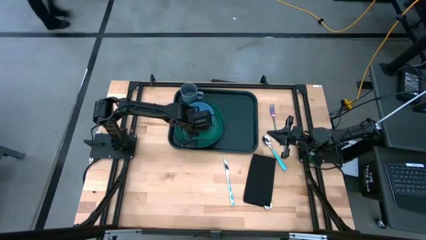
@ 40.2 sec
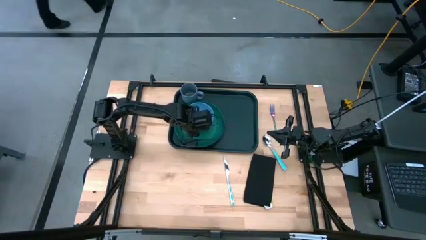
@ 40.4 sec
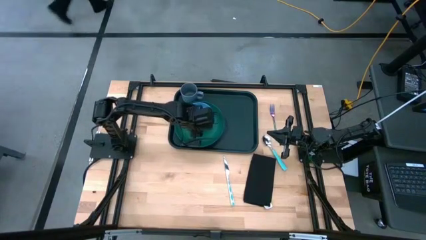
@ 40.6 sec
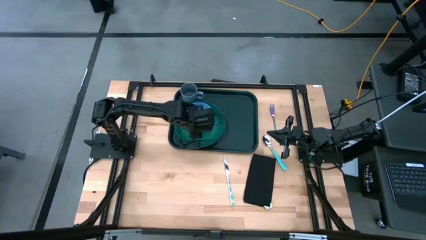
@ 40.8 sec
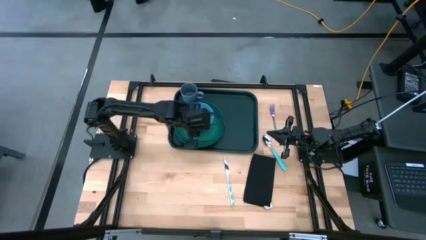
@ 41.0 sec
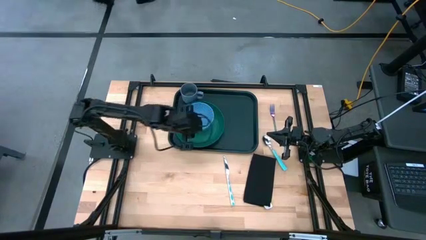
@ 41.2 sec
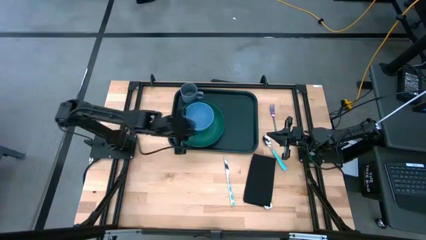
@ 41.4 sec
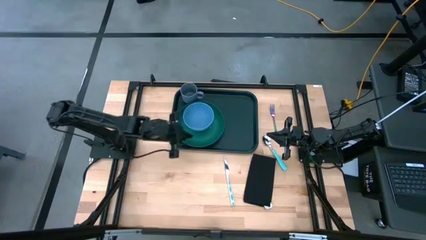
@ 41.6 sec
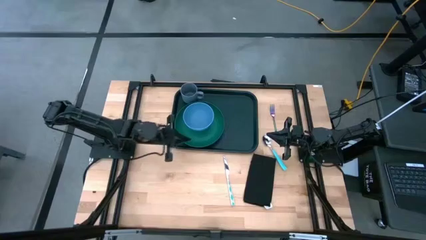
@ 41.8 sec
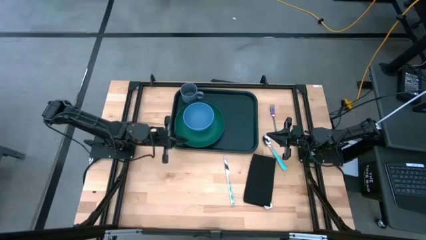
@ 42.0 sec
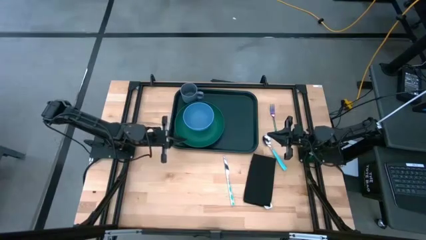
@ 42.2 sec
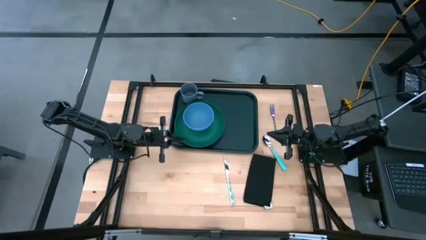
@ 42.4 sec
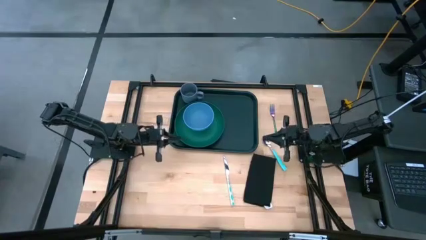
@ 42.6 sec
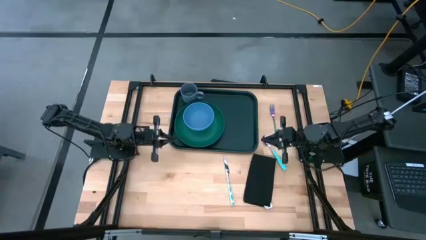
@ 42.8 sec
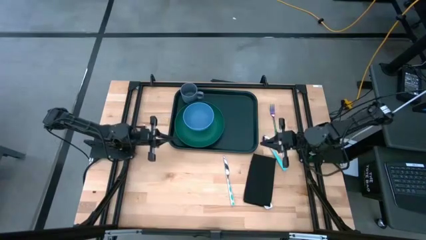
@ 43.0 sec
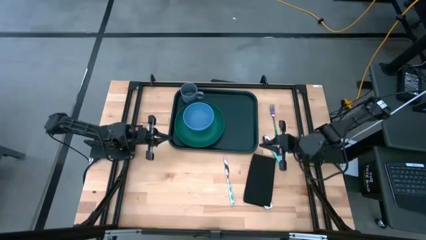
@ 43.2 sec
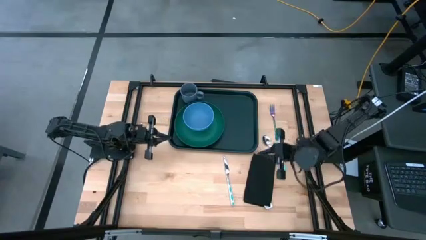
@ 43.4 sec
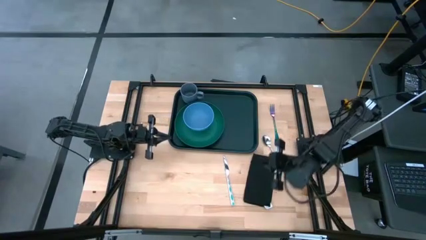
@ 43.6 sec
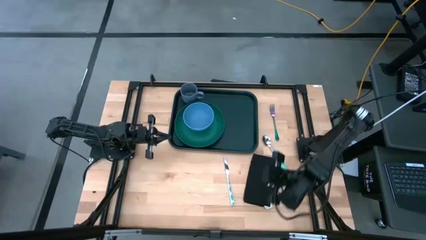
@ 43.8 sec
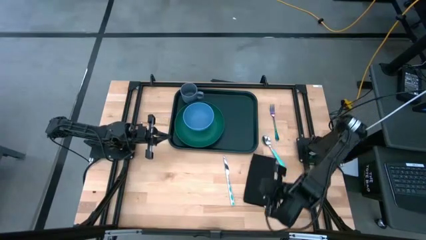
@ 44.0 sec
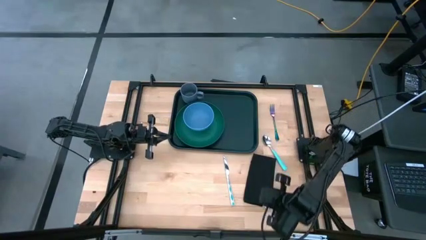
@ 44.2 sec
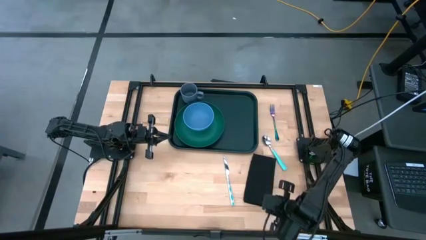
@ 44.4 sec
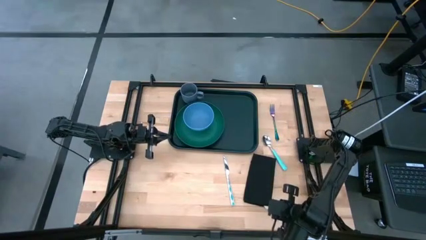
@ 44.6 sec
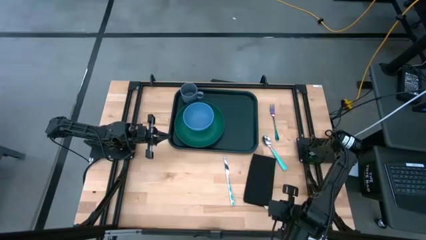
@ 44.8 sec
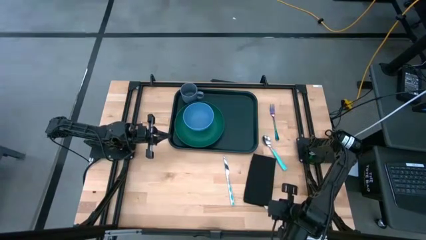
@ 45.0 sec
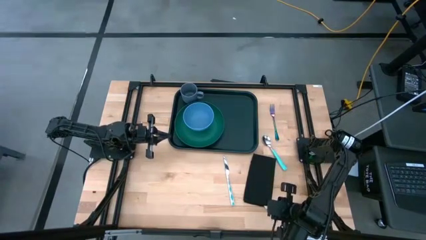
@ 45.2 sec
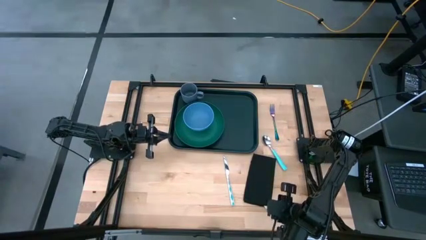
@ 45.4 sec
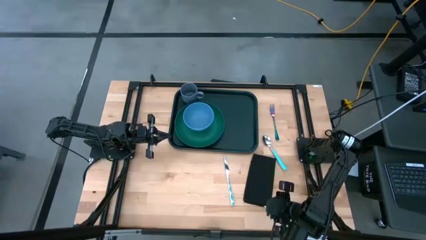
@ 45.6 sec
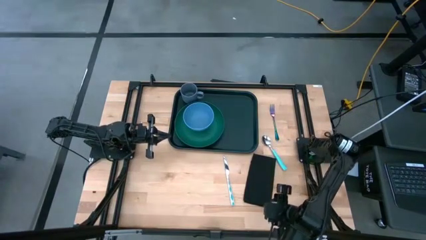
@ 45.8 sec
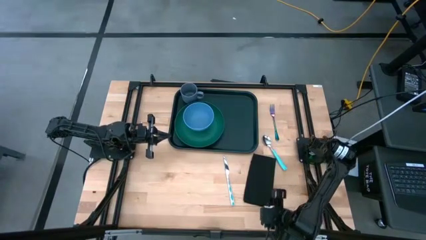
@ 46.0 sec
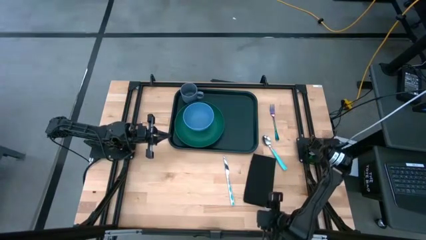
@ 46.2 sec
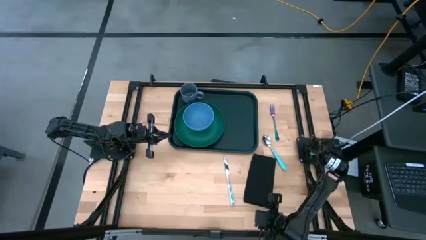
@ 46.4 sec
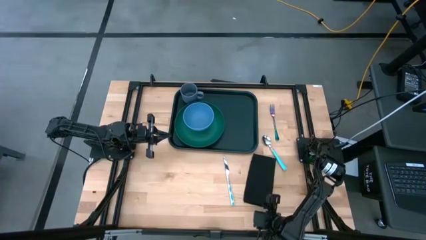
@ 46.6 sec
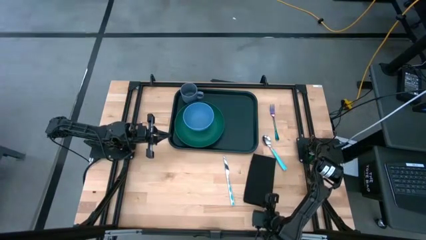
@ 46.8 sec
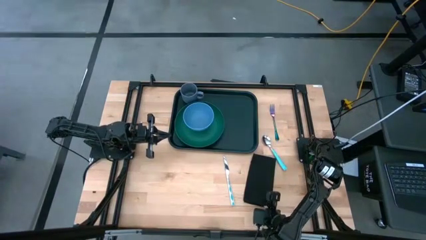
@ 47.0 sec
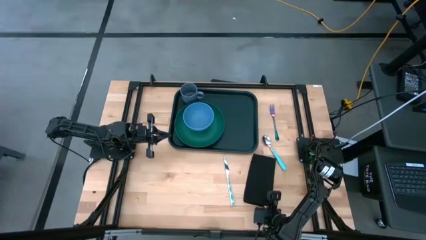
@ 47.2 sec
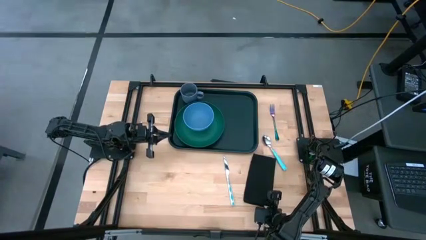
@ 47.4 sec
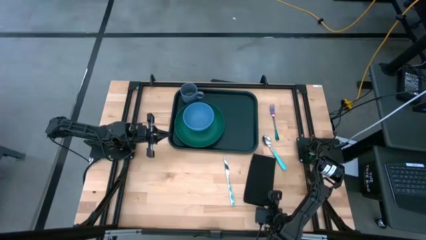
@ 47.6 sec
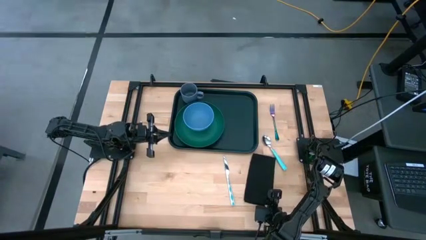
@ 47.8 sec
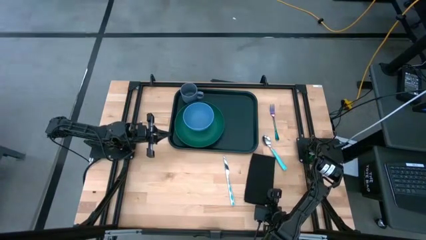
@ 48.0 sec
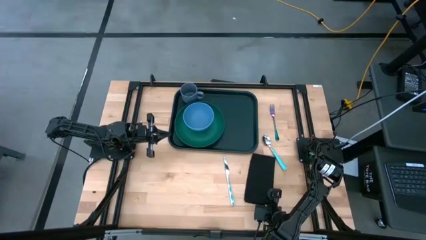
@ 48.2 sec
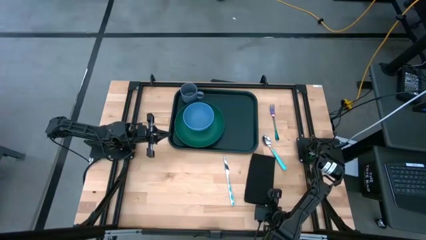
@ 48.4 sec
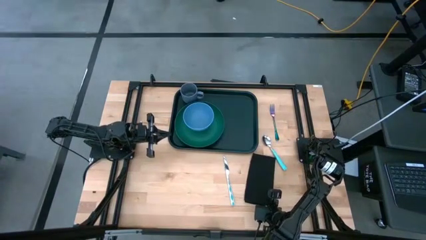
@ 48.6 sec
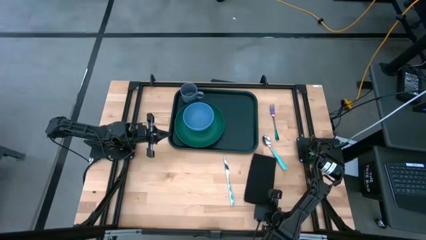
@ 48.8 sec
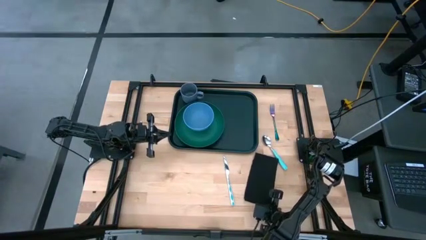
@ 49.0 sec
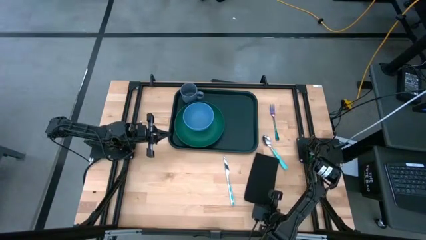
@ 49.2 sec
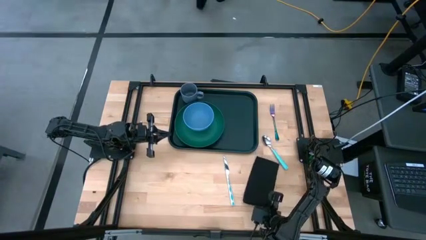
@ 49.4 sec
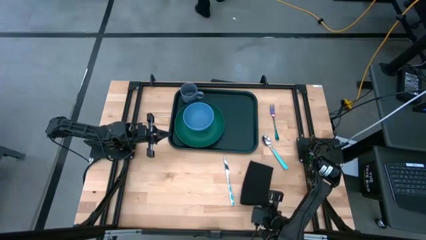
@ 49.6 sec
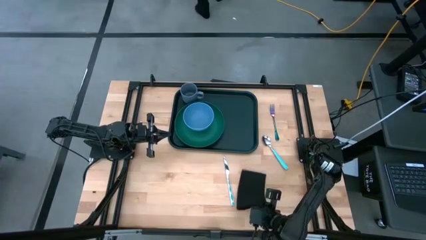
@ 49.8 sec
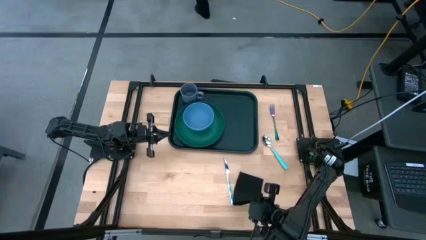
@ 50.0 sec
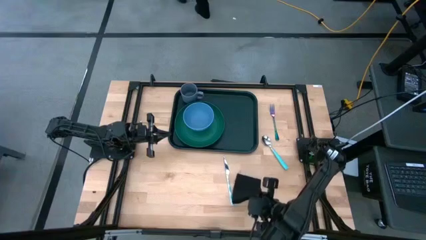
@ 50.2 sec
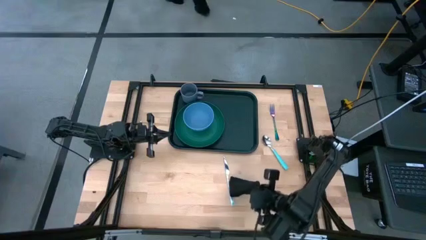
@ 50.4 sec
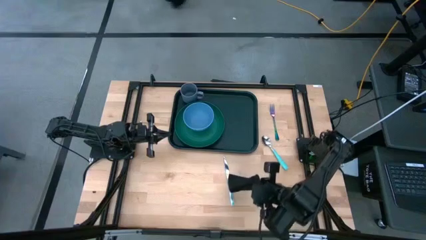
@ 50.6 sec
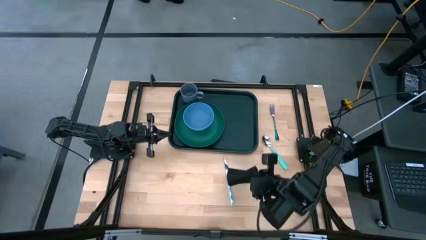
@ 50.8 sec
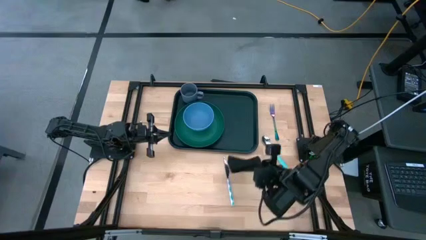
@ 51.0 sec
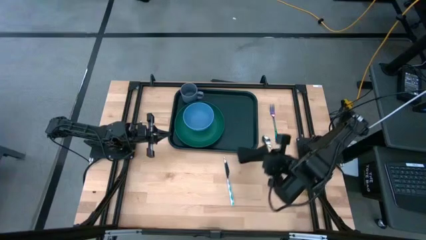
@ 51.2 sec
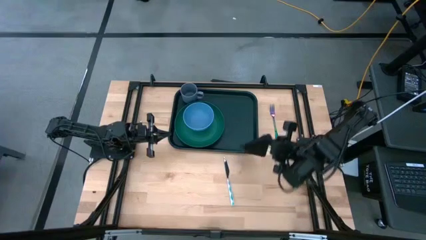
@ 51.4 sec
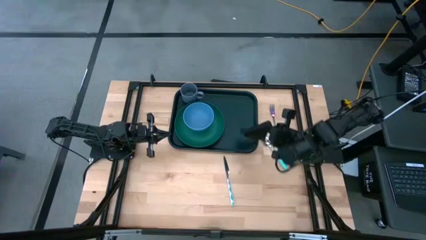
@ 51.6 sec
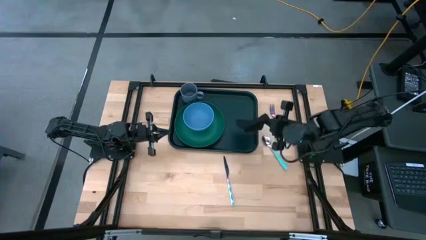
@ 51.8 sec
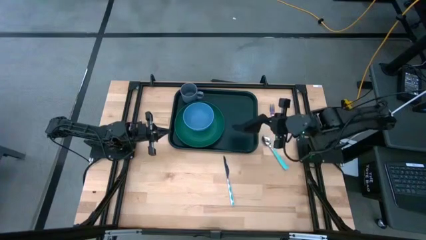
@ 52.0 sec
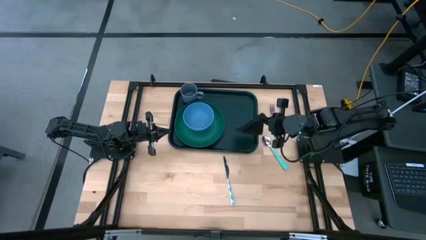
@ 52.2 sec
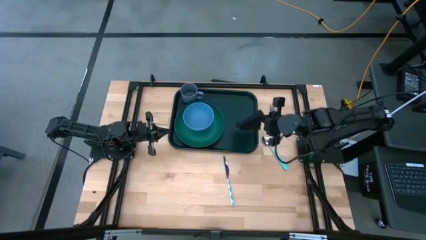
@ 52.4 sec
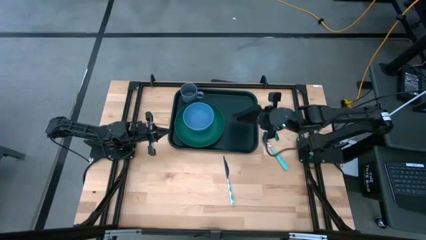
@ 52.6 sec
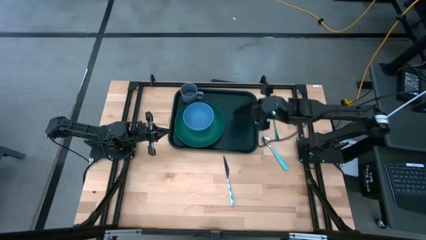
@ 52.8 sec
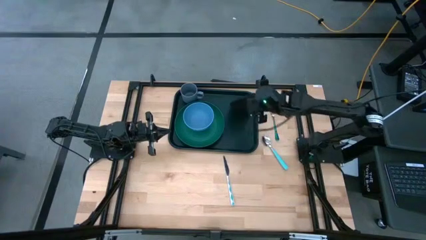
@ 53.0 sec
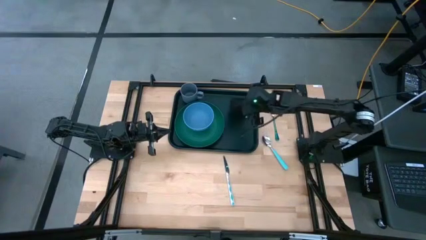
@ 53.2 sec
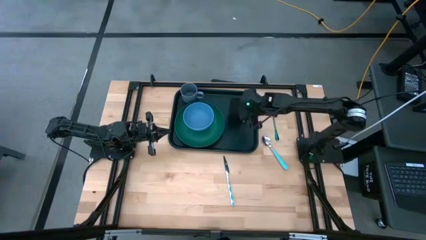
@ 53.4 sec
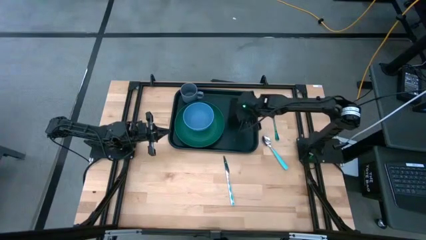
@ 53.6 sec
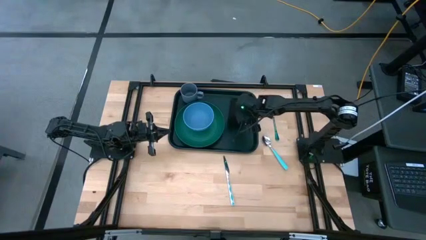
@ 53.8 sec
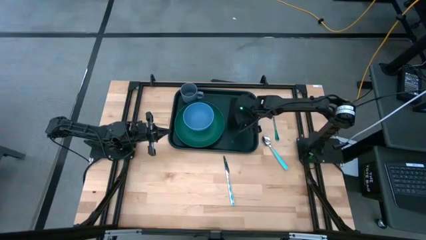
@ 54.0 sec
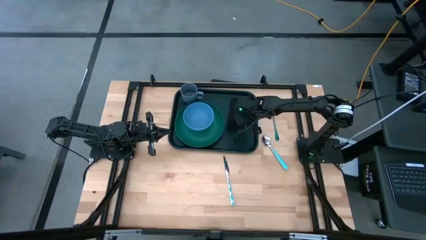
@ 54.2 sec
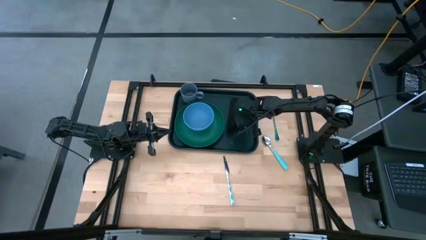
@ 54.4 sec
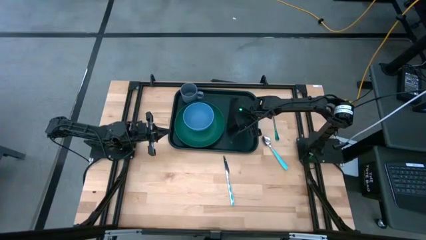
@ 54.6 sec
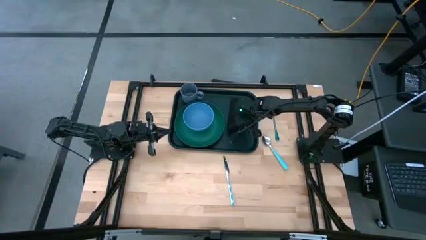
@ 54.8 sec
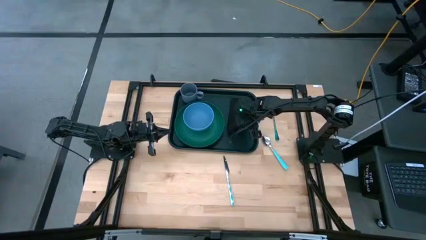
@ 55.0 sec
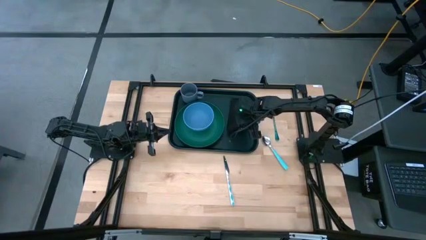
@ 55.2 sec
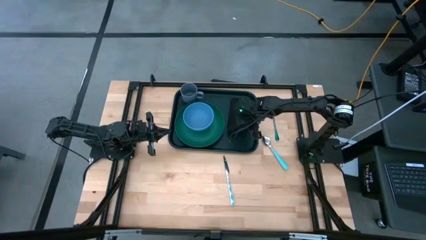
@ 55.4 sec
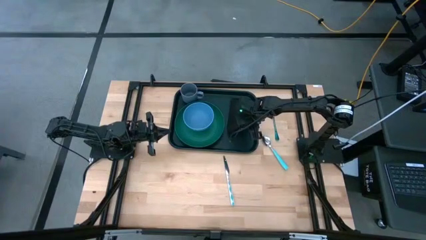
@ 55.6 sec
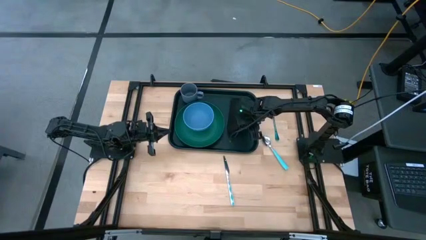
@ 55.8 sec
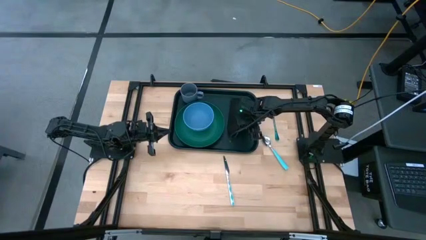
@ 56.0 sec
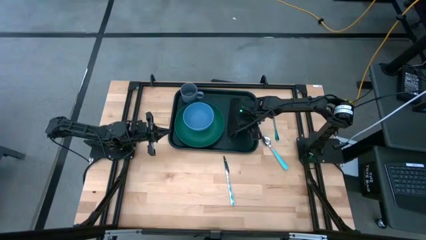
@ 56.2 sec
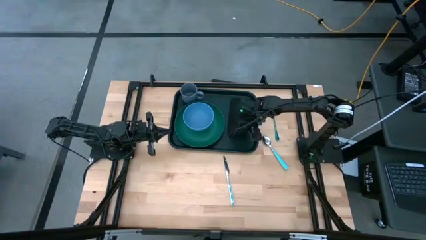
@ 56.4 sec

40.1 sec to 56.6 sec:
Task: Set up tray
Put the black napkin on the green serving tray to the right of the green plate
